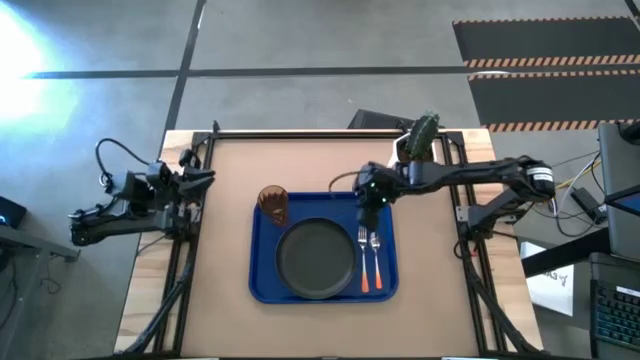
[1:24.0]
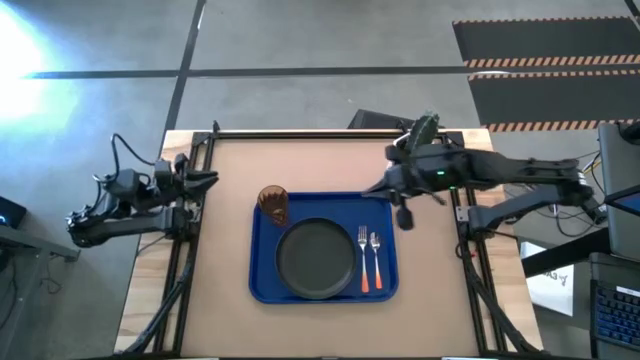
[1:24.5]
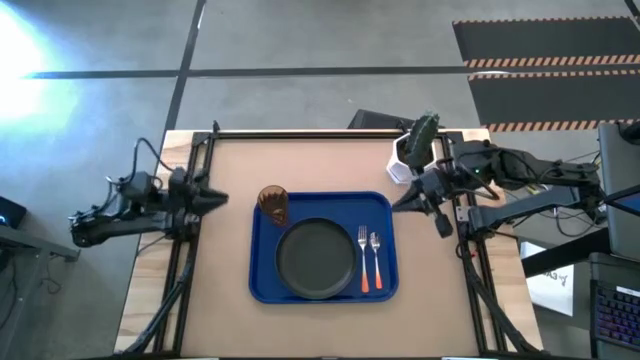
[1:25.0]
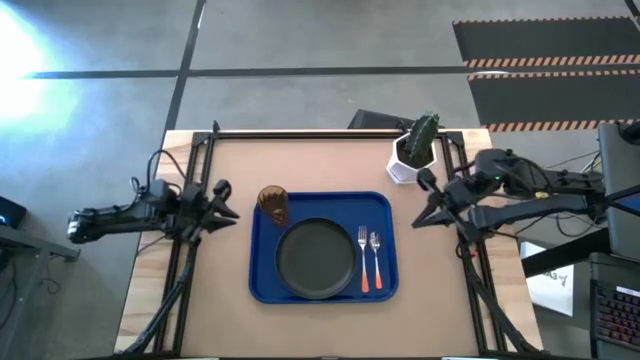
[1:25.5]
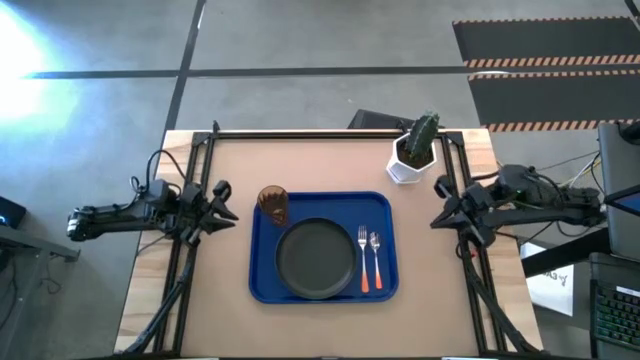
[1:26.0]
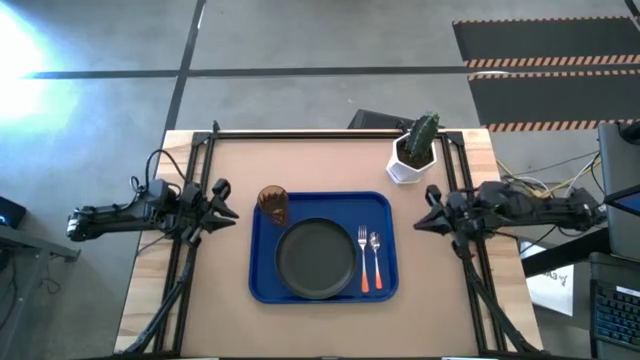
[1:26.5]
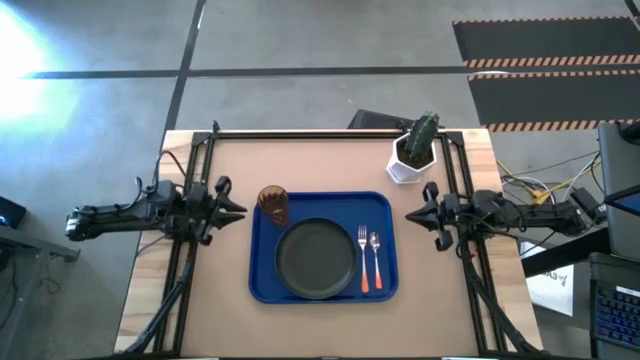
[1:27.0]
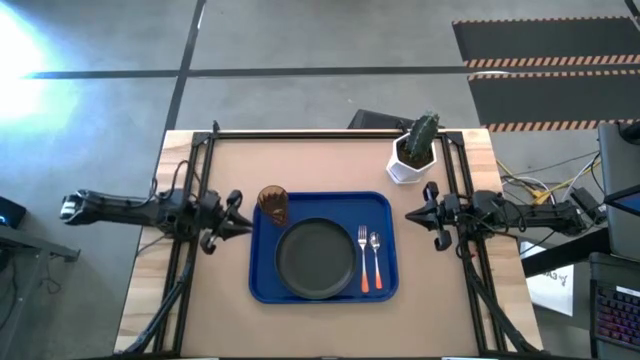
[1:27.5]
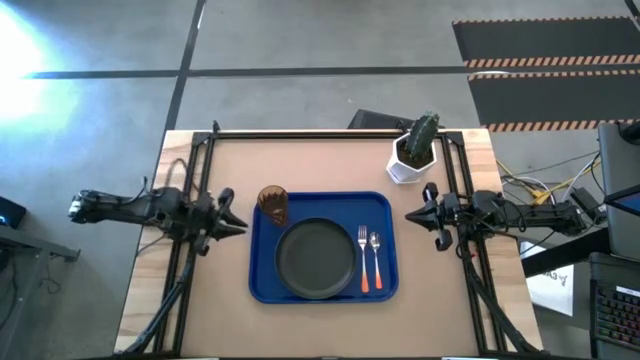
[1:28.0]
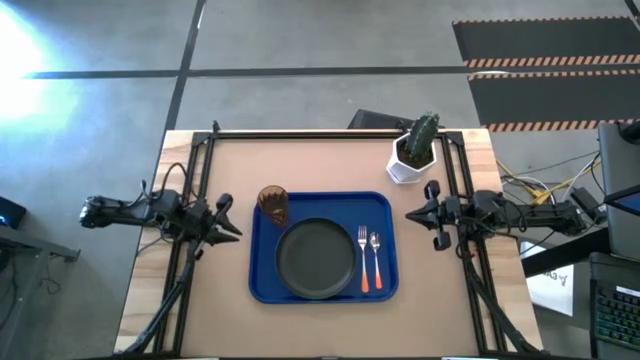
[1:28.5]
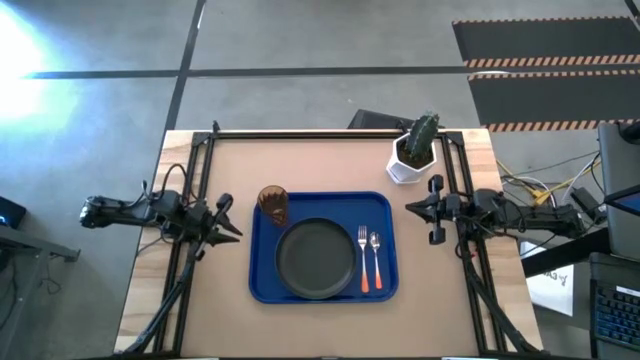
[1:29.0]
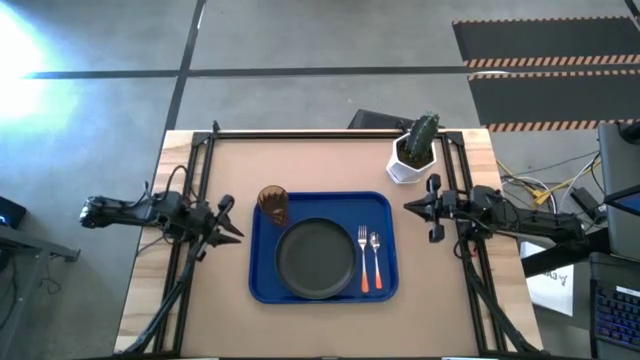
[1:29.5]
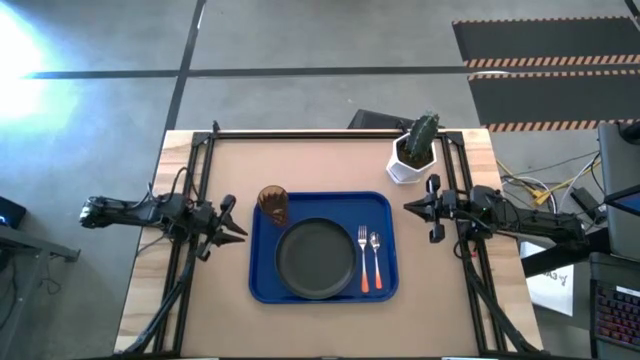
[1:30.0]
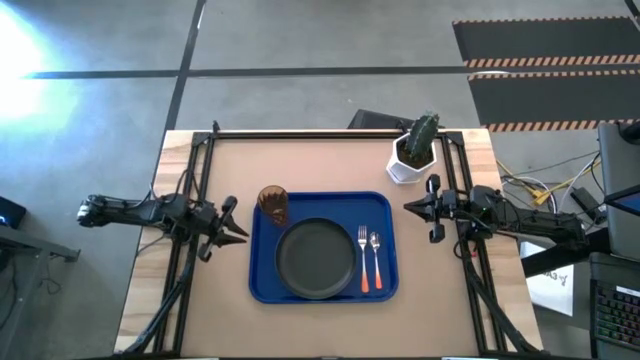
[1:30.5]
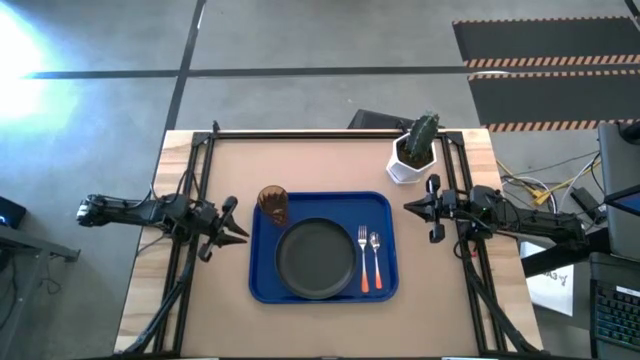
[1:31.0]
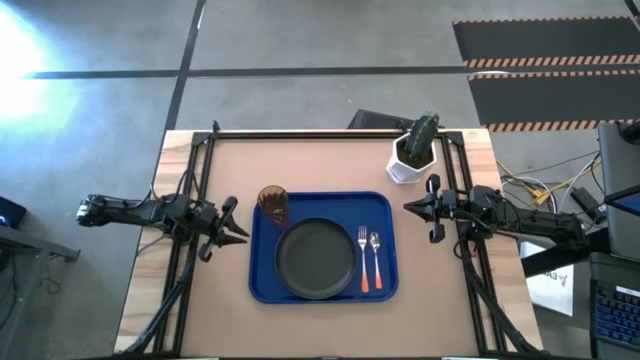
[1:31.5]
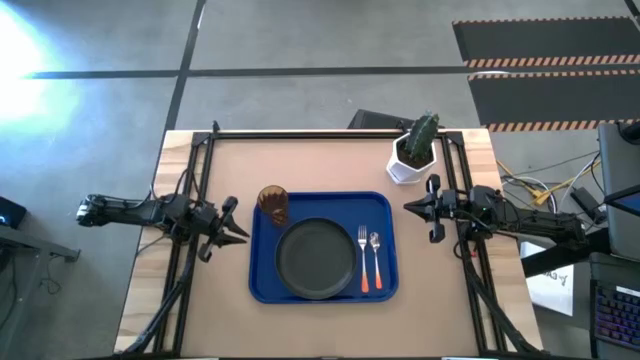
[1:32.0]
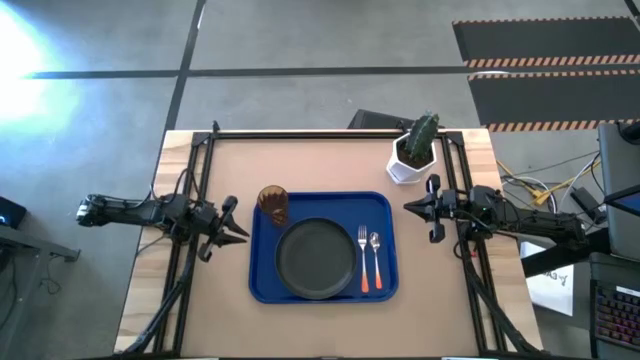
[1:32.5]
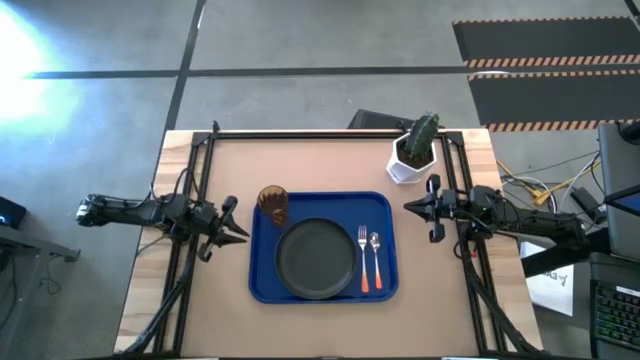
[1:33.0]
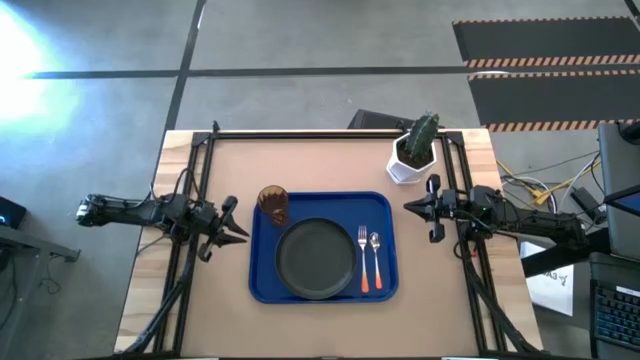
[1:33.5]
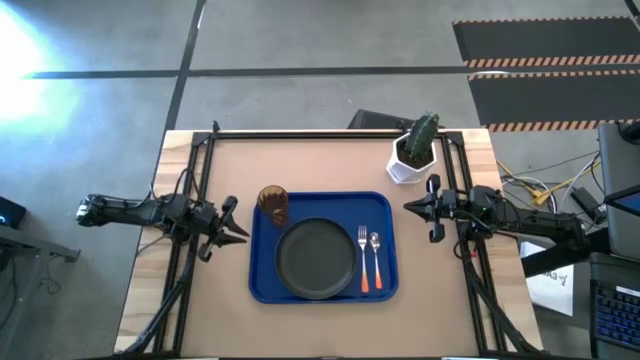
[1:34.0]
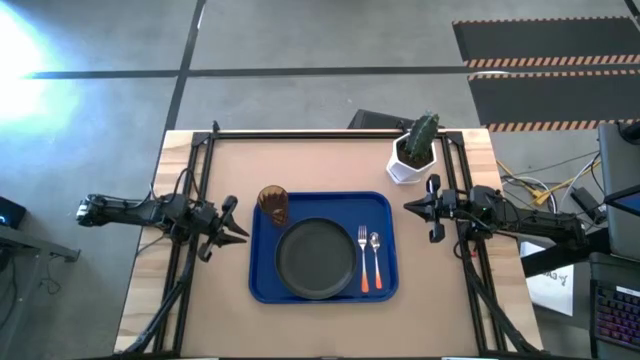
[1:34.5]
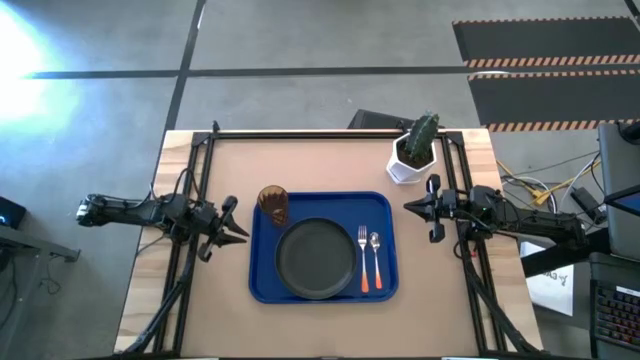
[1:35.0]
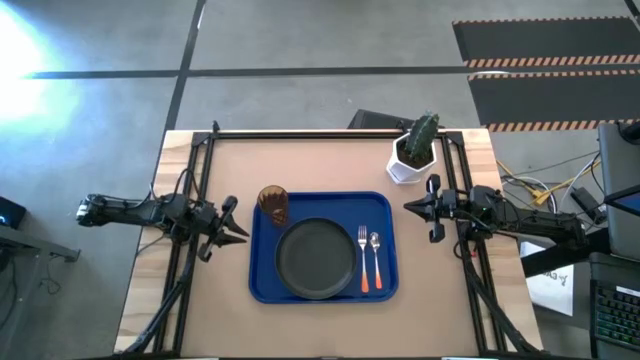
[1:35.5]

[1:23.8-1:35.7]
Task: Pick and place plate/cup/fork/spoon on tray
Return to Home Position

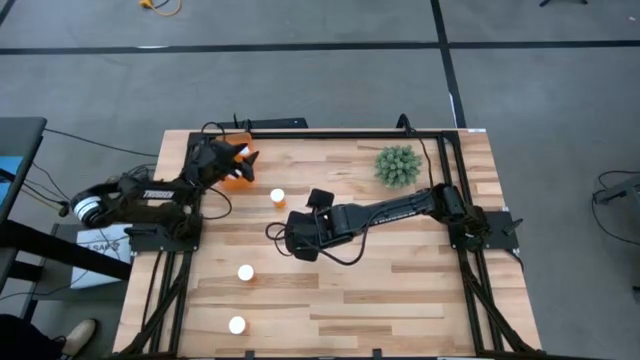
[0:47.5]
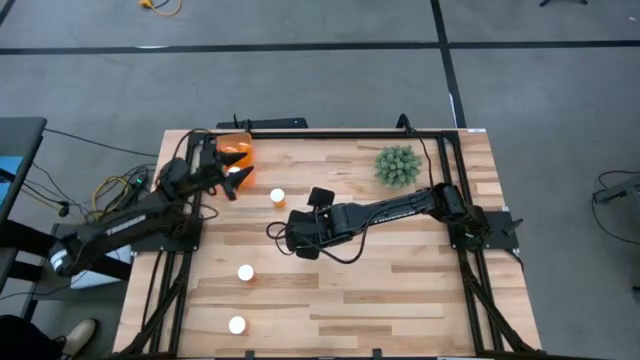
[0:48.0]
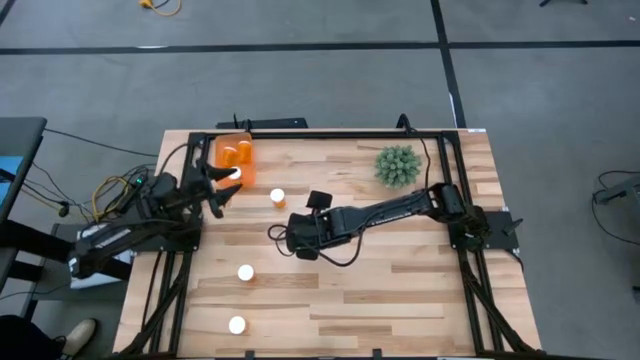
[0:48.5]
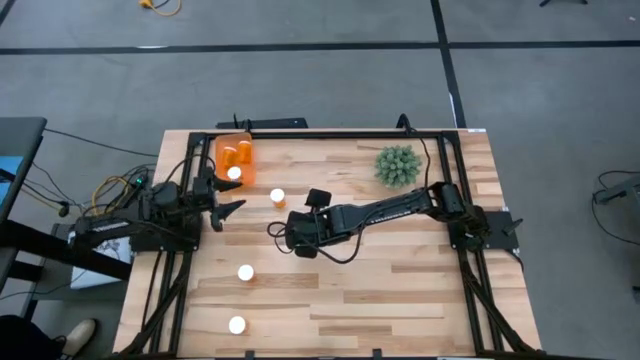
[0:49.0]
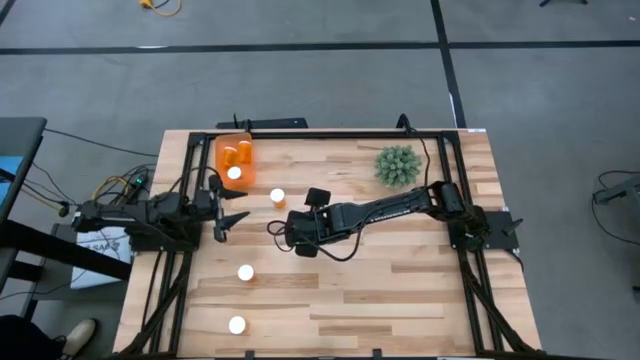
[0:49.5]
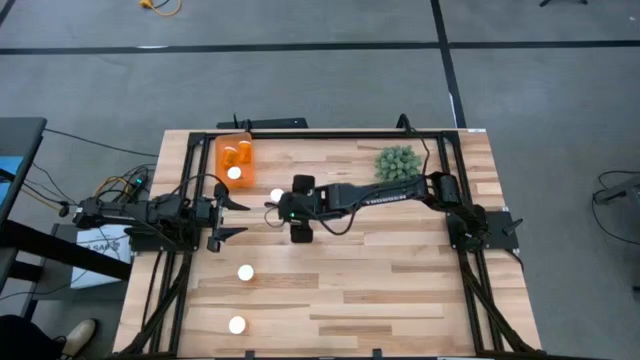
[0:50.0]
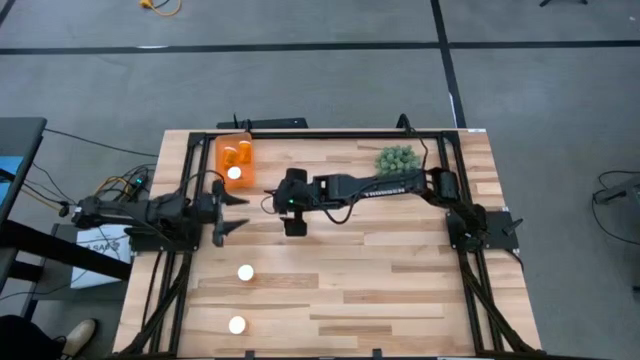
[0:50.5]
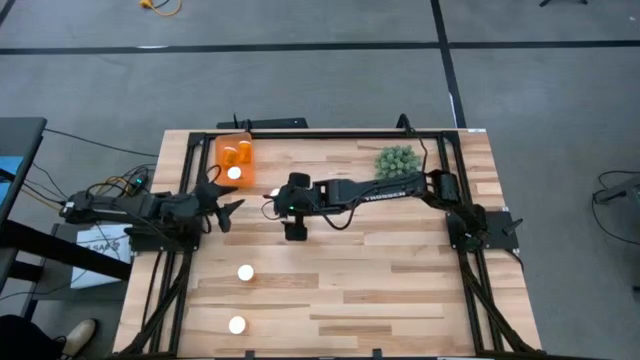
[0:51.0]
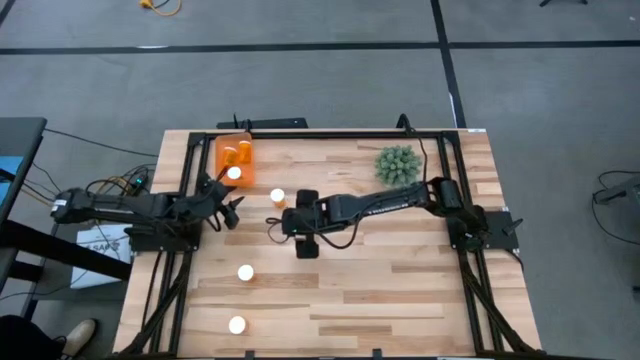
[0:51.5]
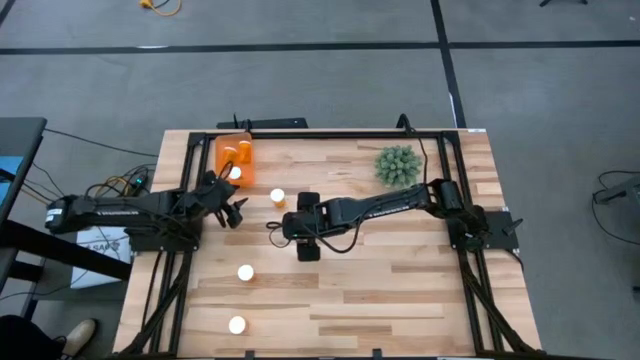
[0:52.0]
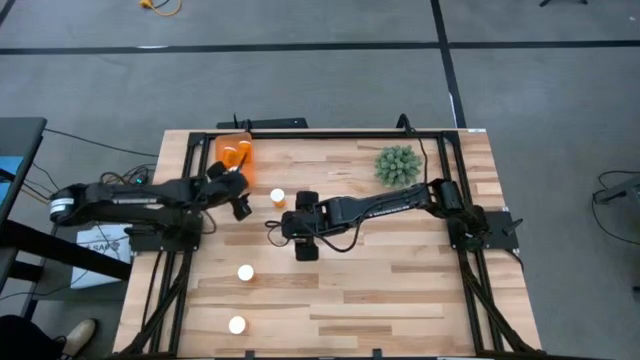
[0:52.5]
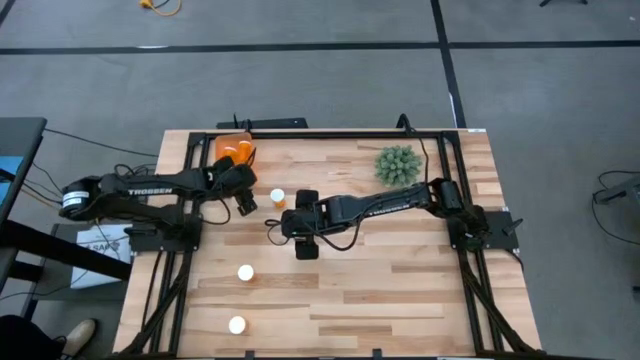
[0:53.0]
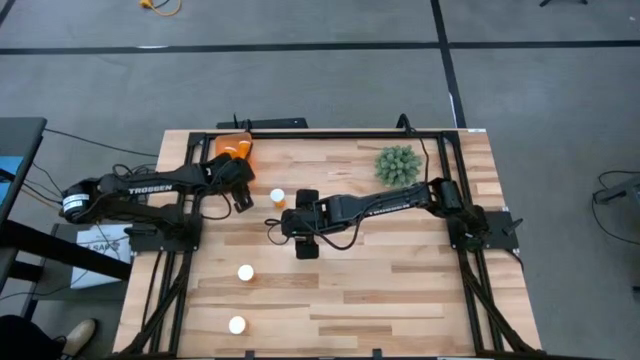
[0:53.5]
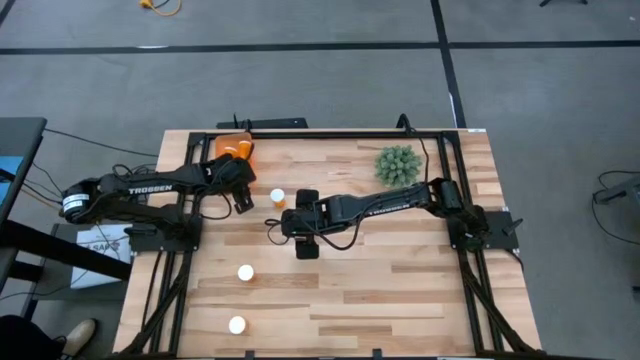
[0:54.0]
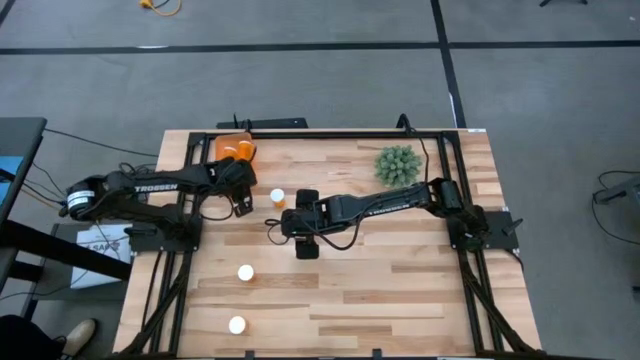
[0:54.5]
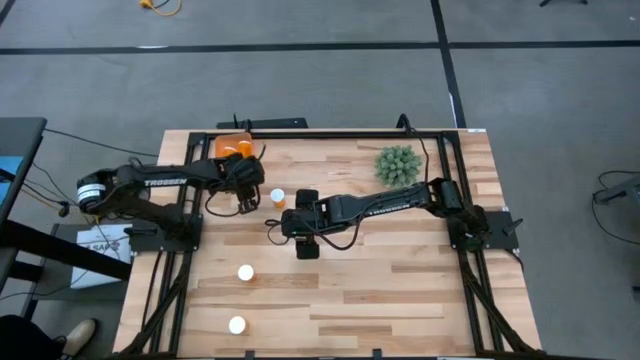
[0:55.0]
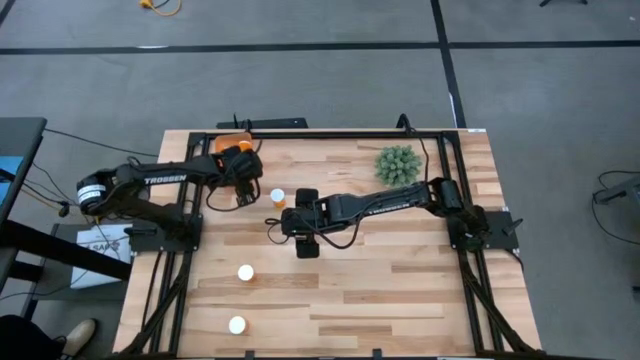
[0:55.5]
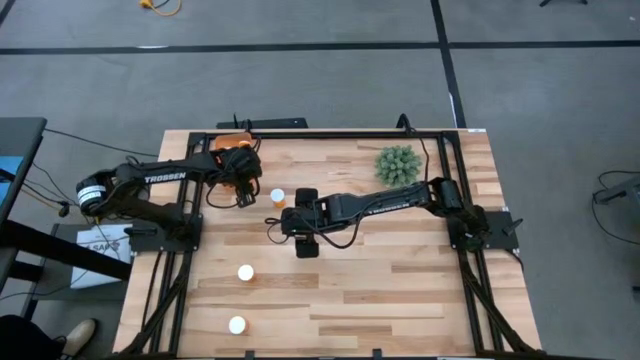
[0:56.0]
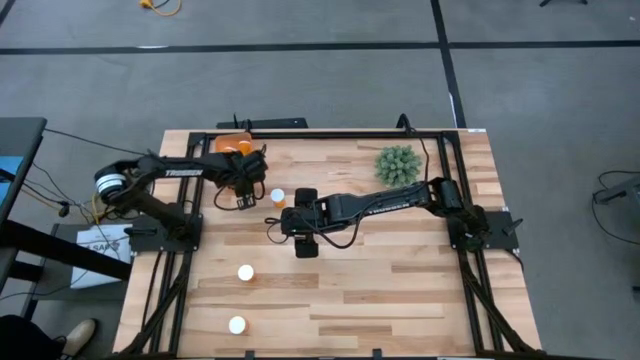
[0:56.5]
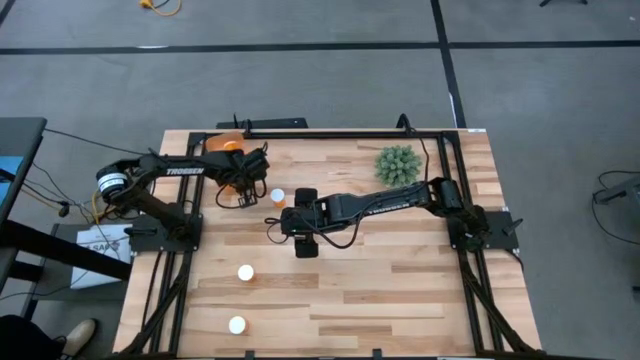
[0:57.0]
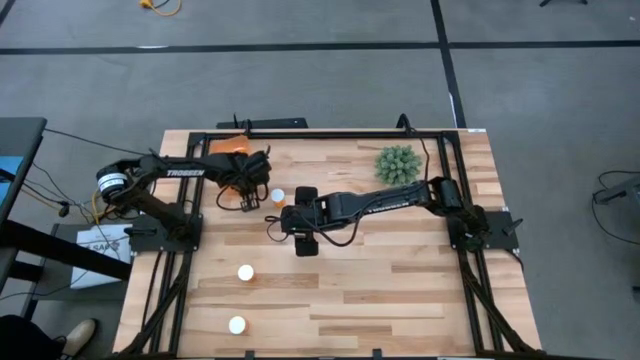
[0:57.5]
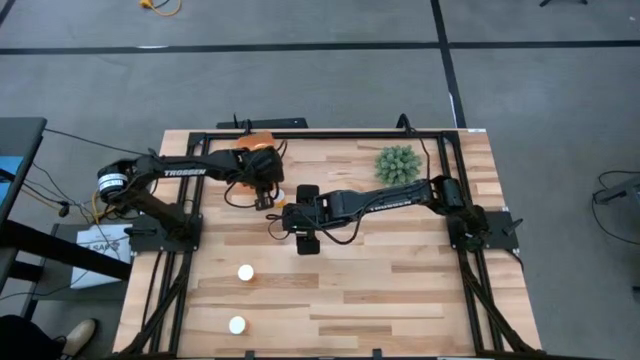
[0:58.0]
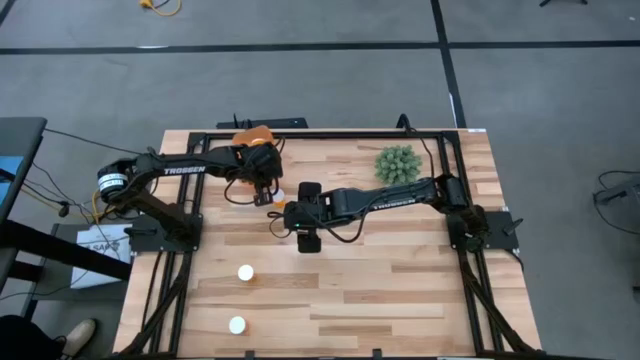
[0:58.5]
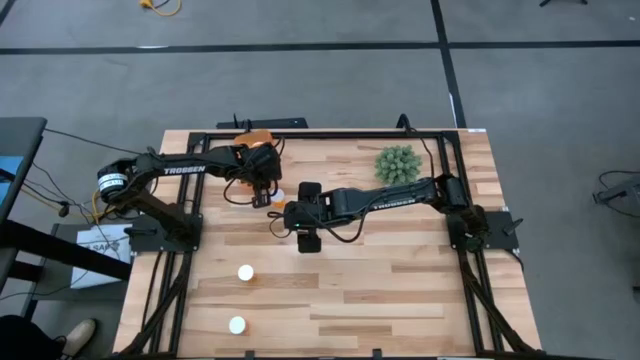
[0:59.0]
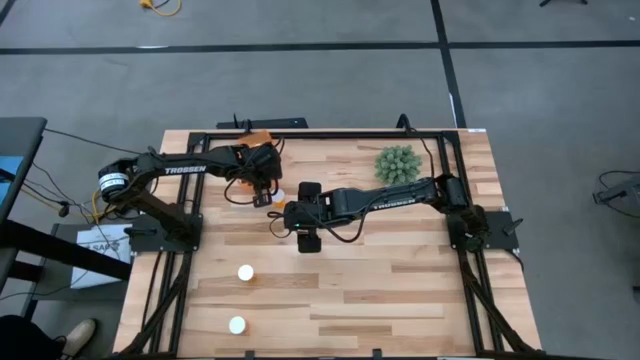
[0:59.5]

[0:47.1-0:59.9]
Task: Pick and place pill bottles into a basket
Adjust the orange container
